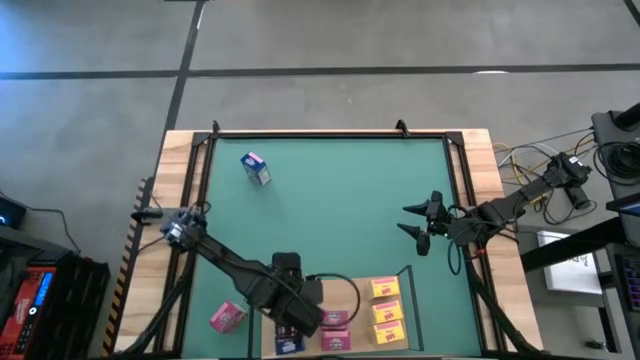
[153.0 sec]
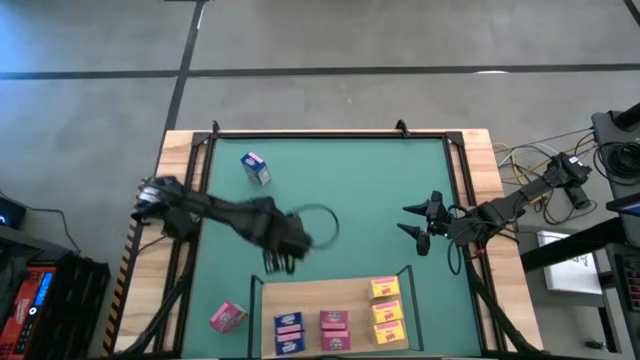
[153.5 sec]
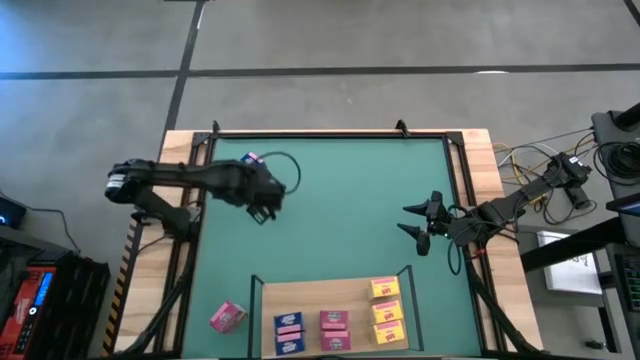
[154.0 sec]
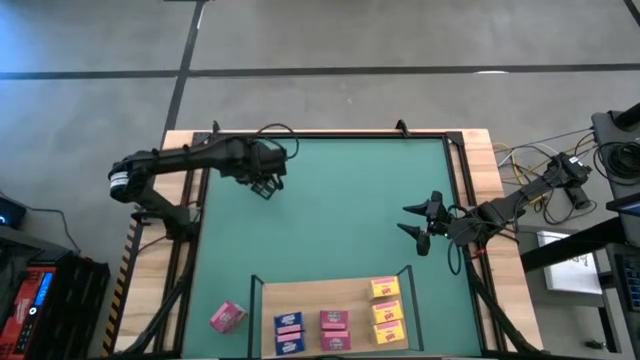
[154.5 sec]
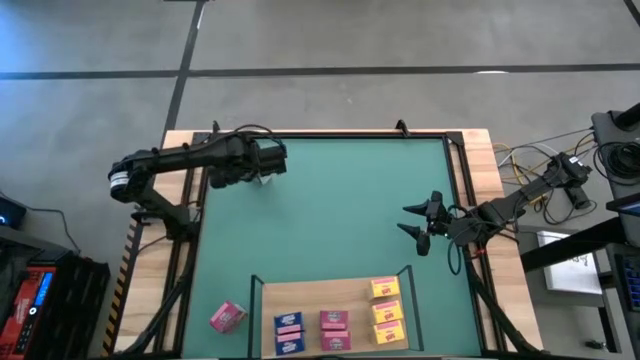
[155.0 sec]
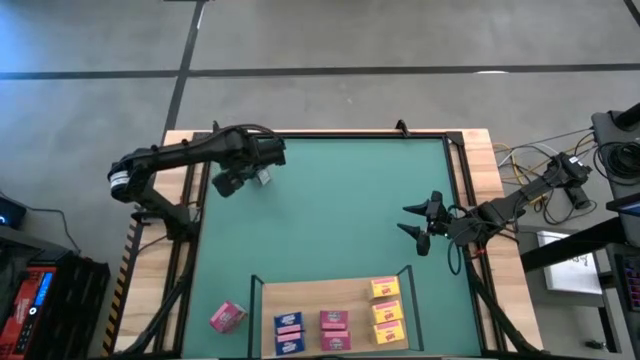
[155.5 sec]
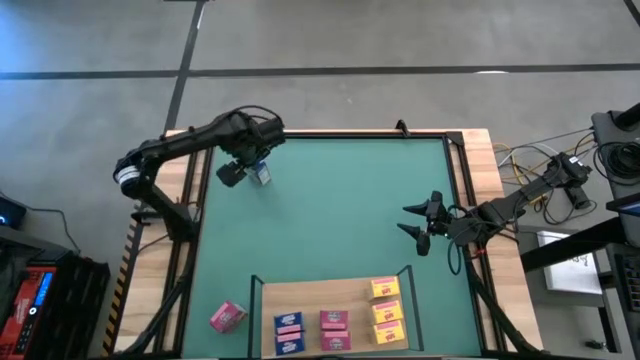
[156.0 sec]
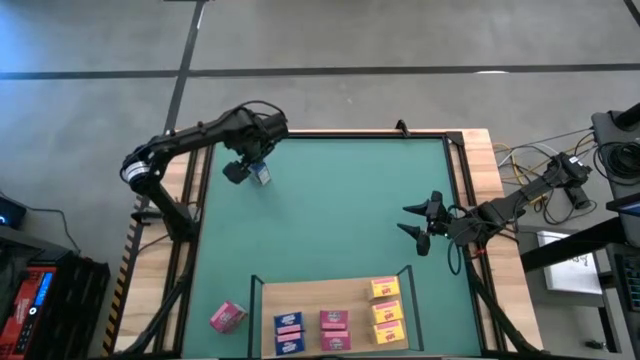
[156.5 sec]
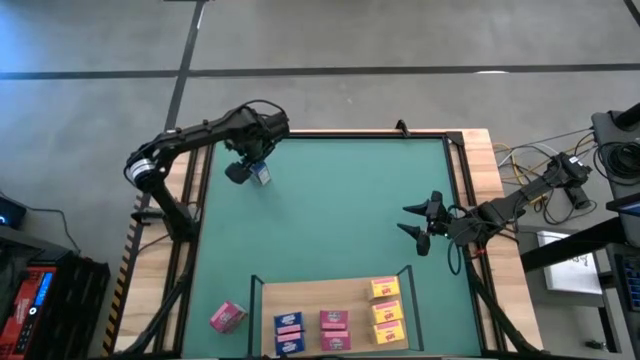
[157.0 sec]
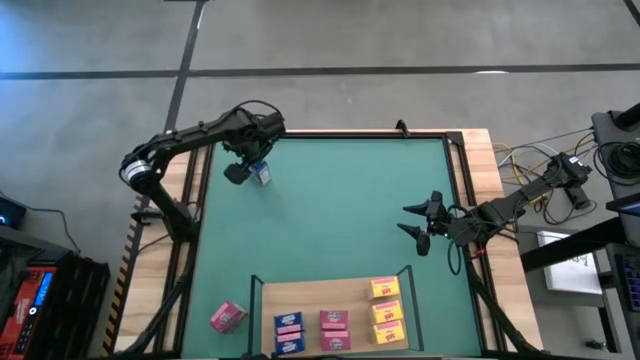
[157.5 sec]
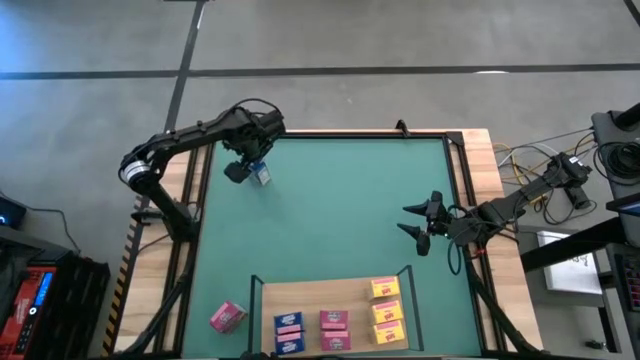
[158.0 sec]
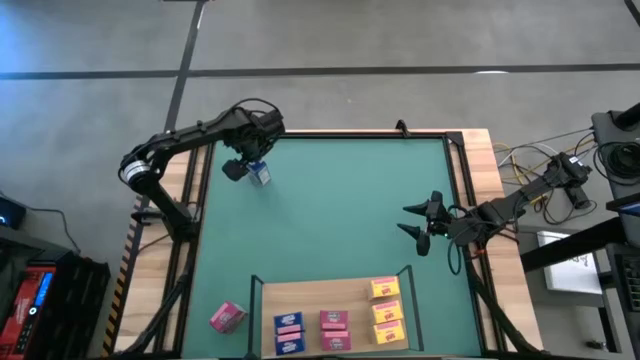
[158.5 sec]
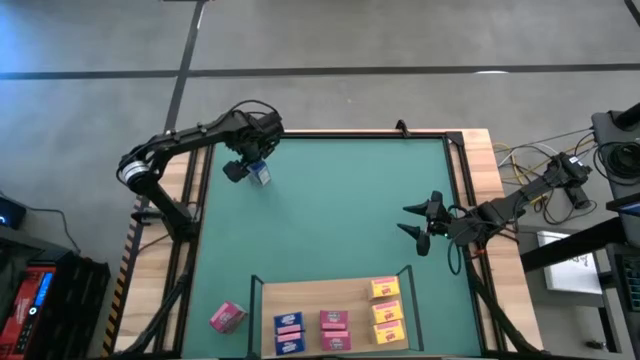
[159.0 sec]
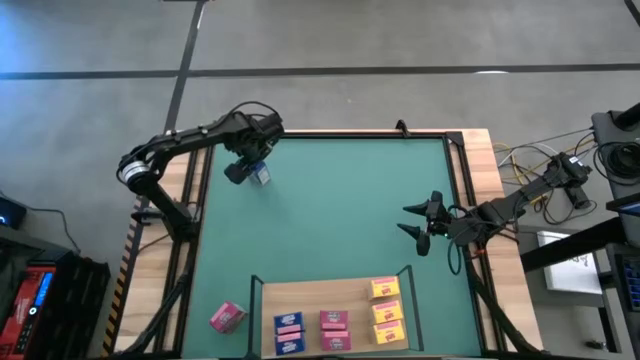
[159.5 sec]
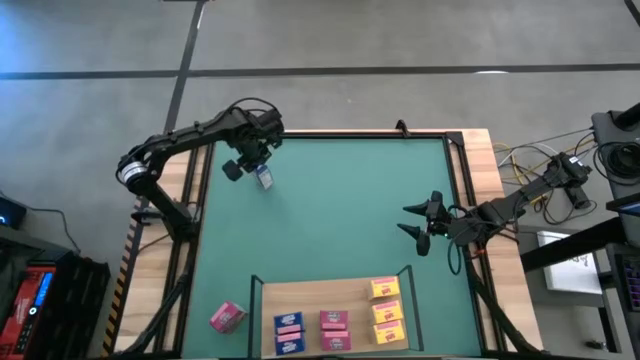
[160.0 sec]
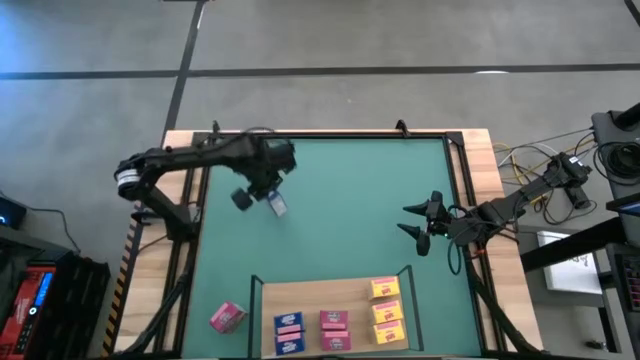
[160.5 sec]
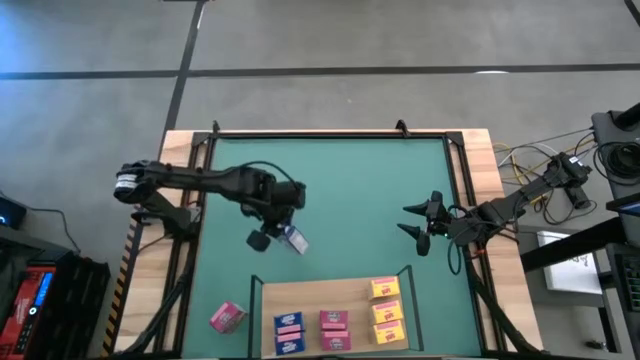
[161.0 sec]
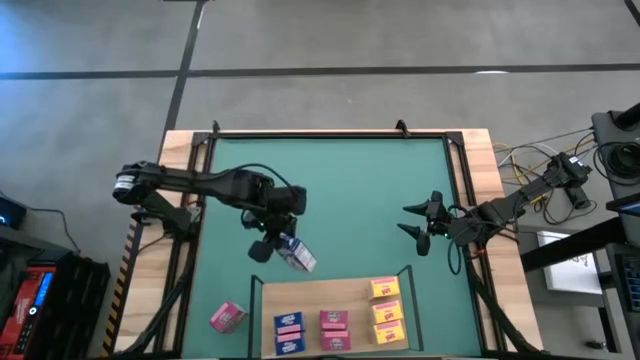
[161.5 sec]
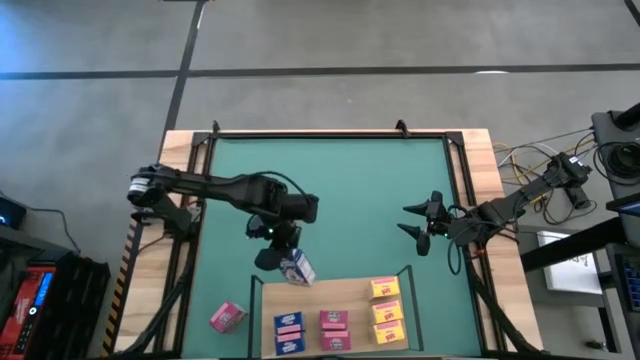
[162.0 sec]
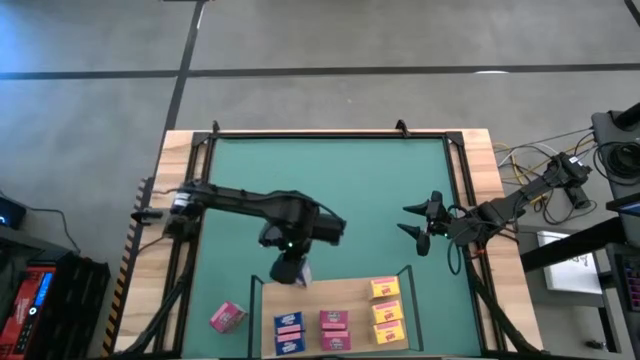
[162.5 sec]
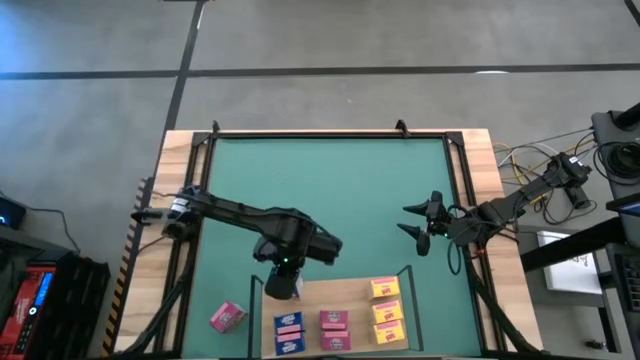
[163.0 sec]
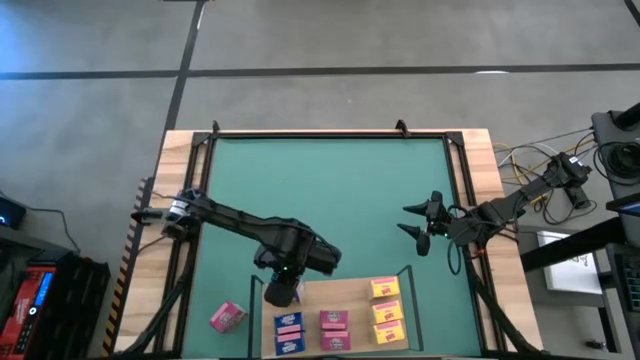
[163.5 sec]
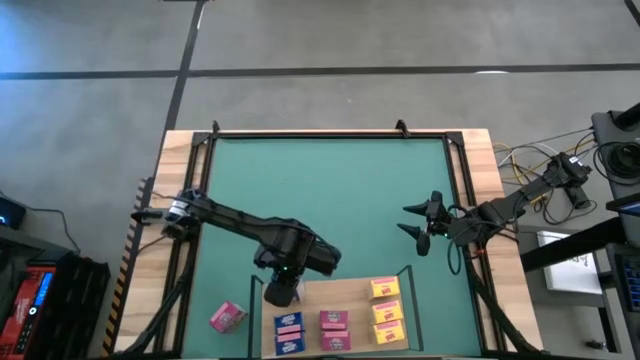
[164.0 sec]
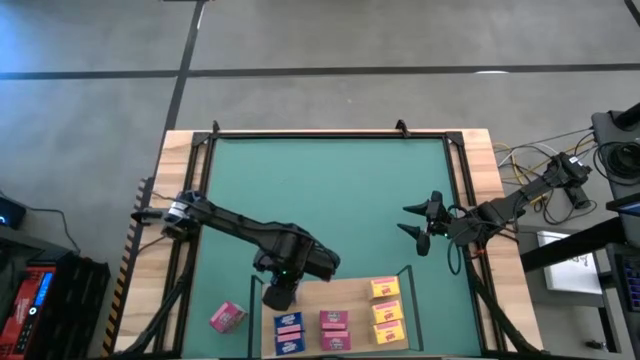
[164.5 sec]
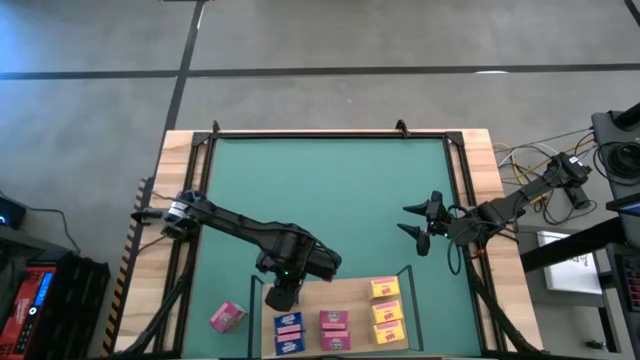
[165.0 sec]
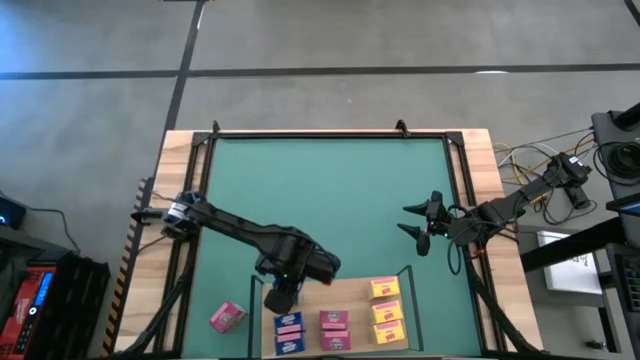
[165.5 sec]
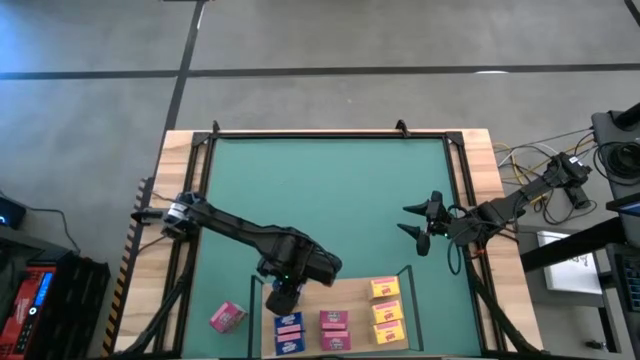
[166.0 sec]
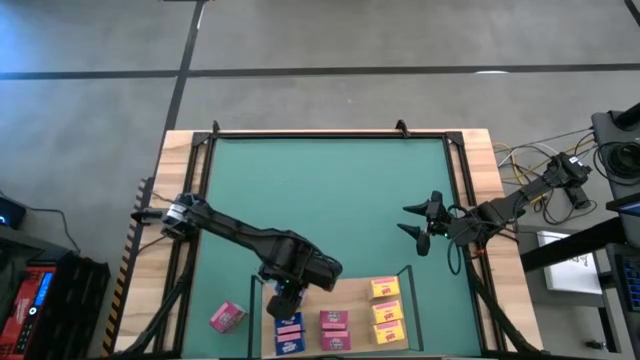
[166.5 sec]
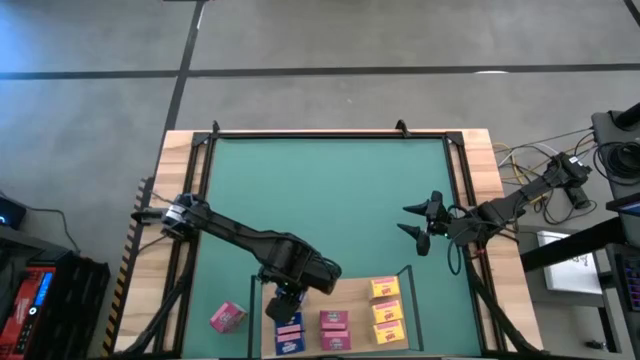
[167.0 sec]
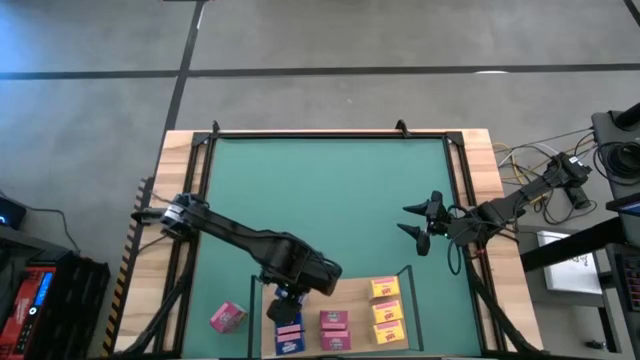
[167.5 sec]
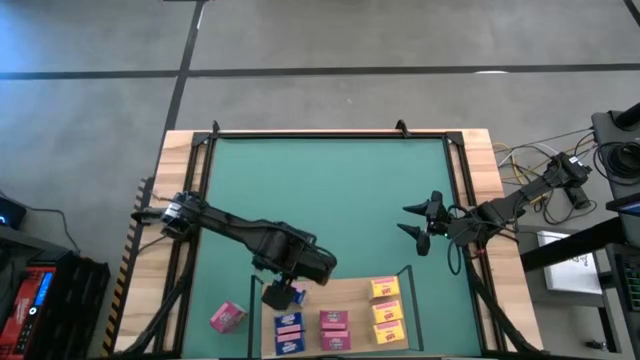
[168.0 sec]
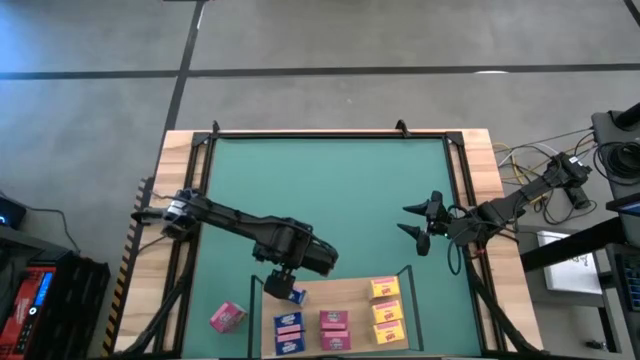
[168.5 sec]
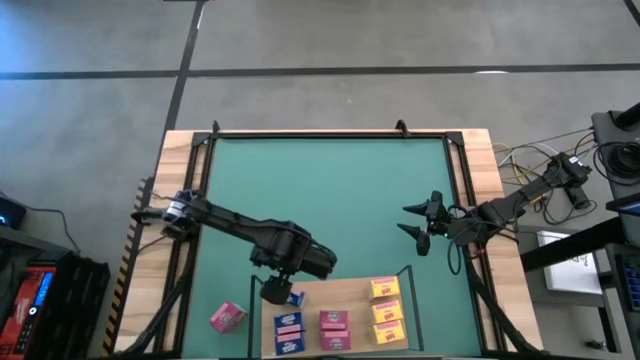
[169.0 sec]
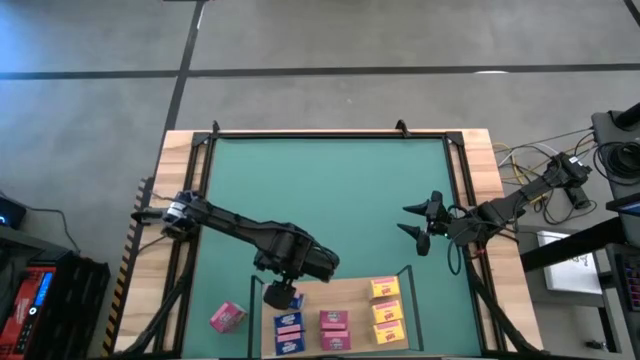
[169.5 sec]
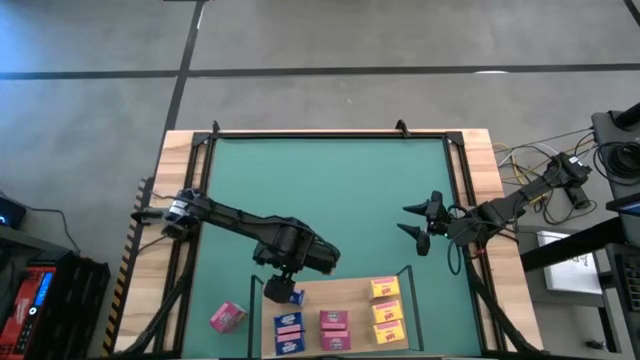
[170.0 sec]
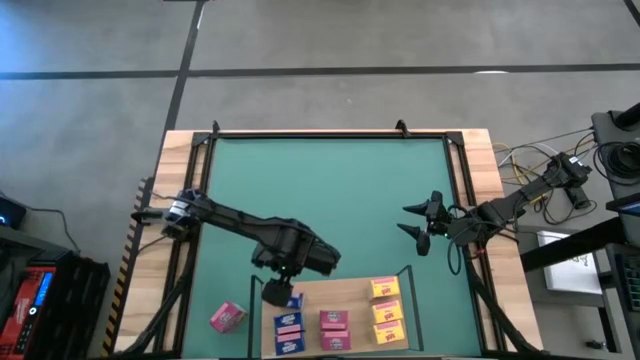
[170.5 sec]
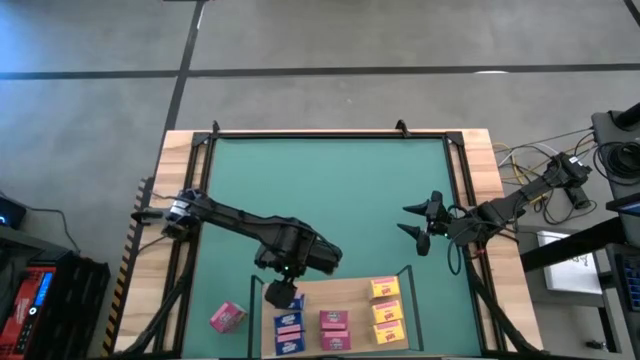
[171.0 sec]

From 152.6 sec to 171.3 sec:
Task: Stack cereal on shelf
Put the blue cereal box on the shelf aligned with the other blue cereal boxes

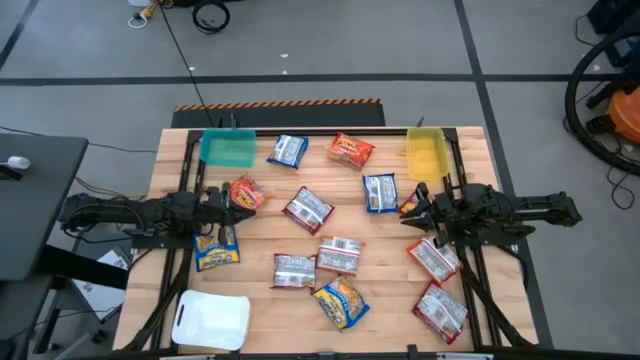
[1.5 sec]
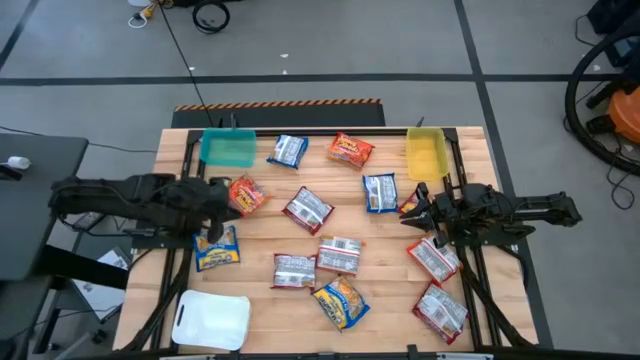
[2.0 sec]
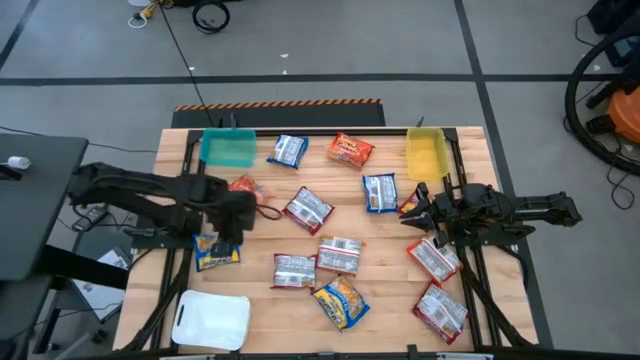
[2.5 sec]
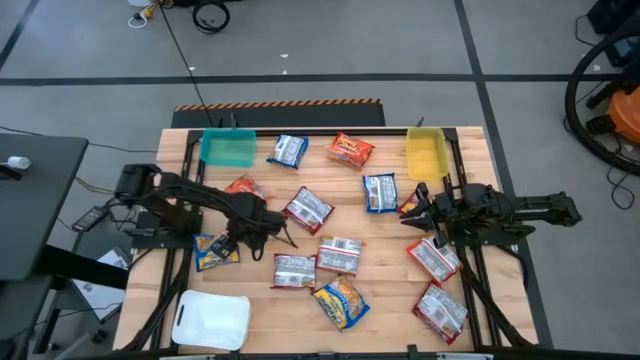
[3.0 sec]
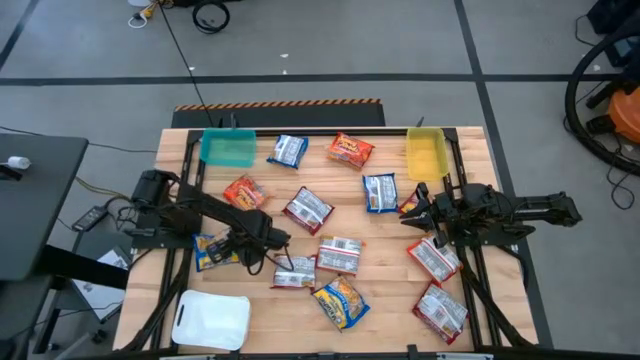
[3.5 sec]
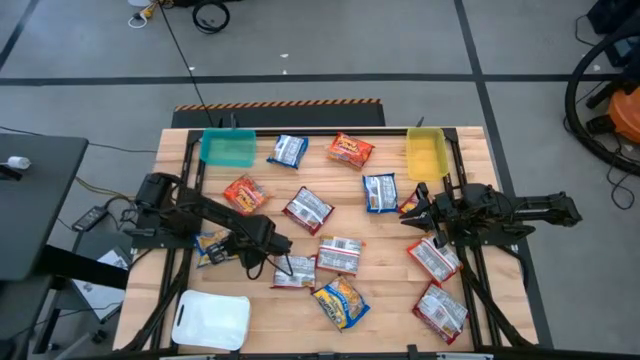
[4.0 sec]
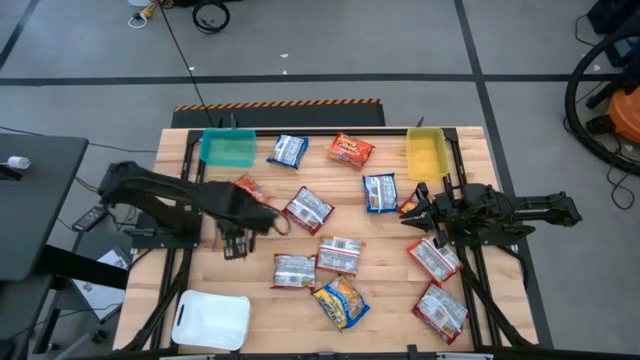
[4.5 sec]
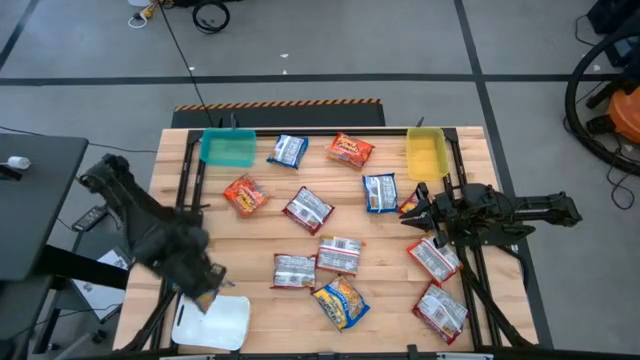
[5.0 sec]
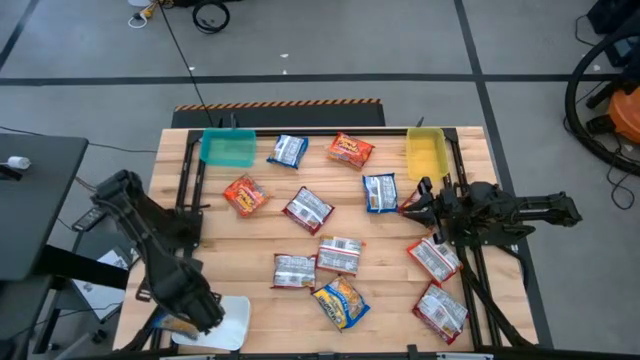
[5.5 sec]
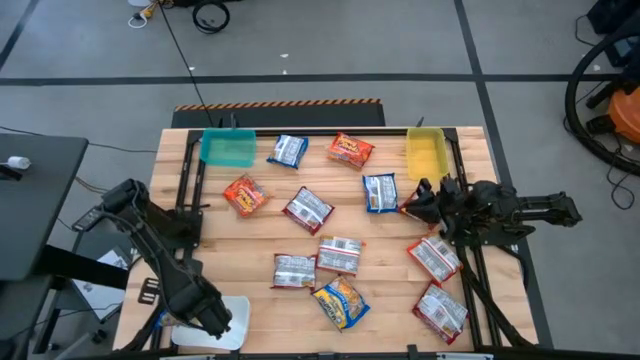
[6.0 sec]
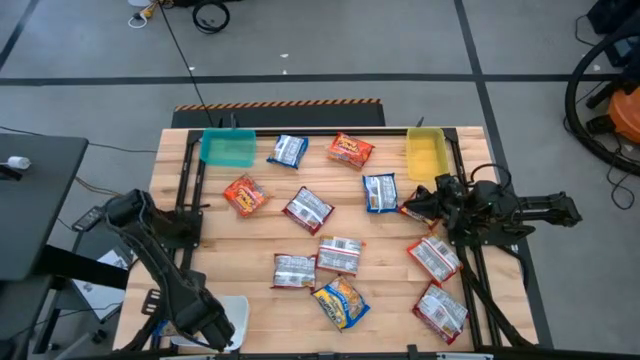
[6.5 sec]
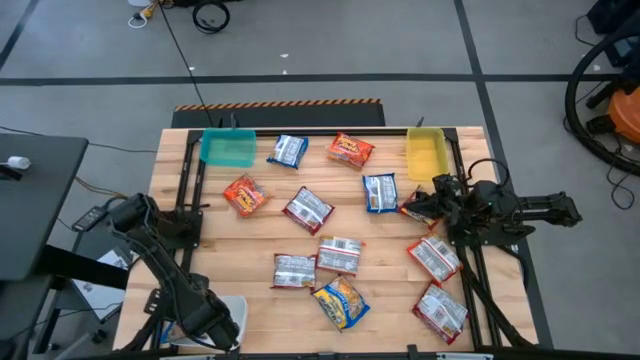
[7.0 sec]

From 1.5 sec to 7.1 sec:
Task: Sort Maruchan noodles
Put the blue noodle pack into the white bin
